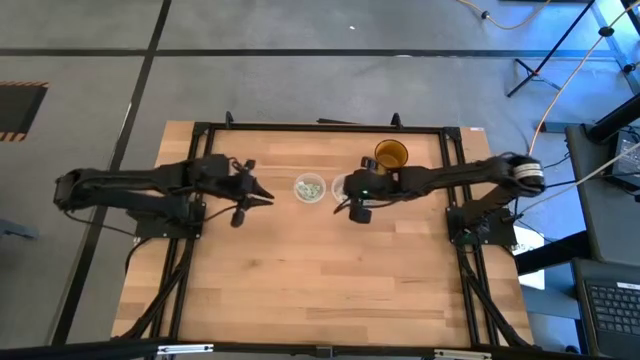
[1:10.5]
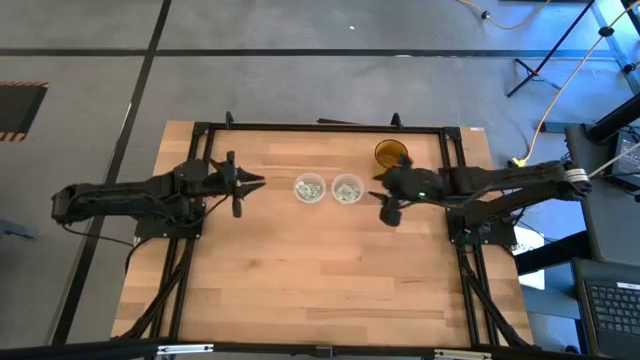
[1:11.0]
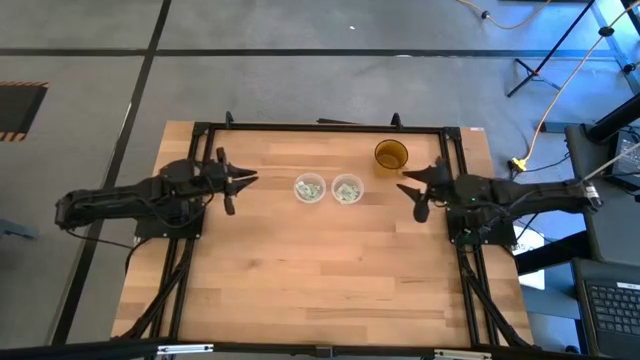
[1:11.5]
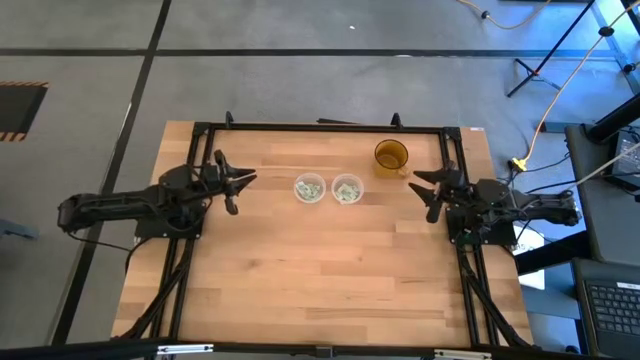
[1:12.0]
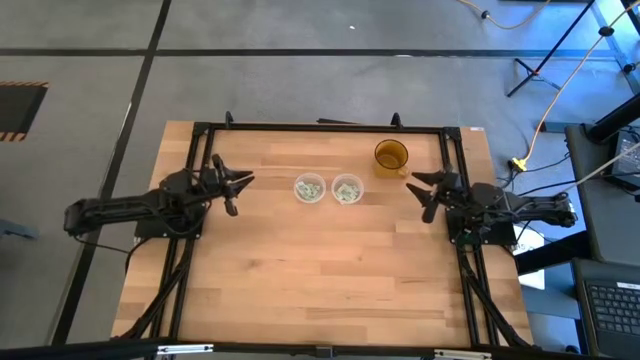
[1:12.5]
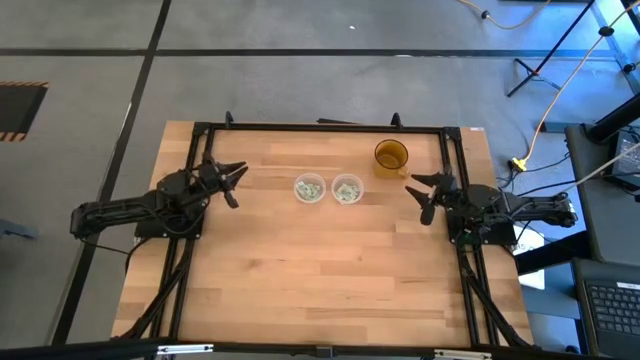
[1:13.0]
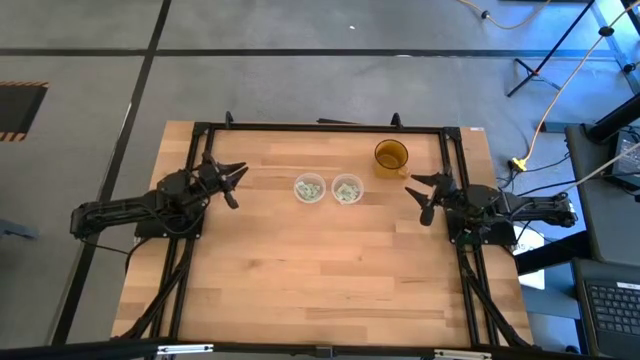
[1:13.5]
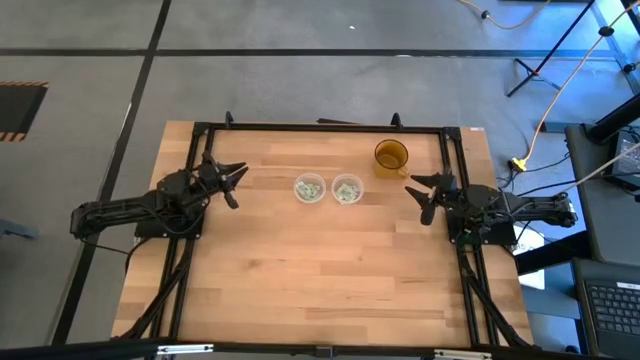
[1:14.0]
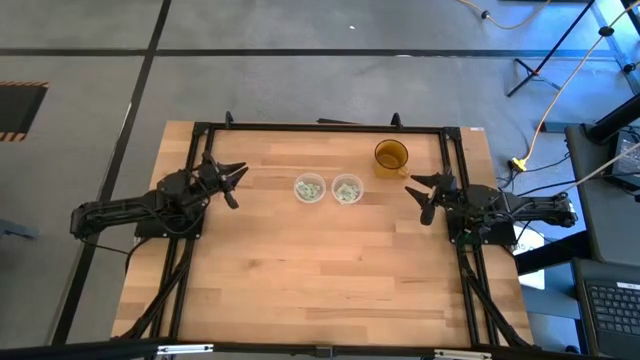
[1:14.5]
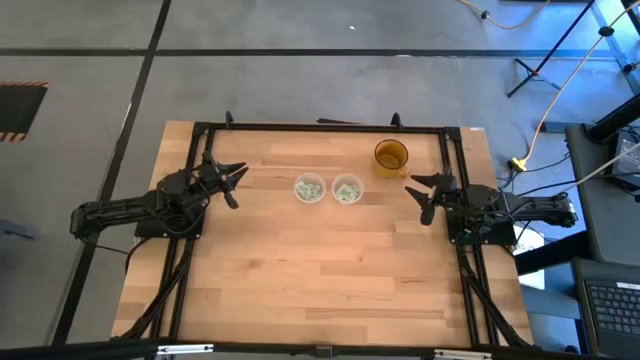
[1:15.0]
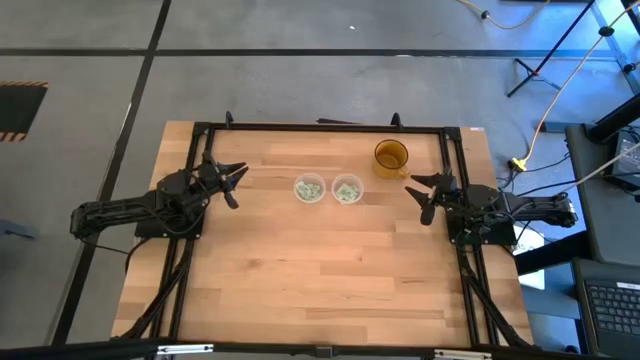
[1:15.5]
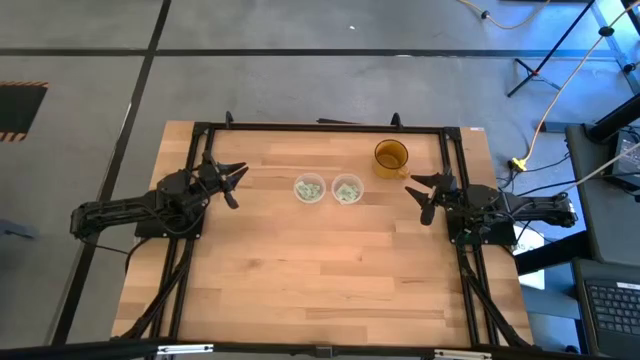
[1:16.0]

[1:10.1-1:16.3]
Task: Pick and place Stevia / Truvia into bins
Return to Home Position

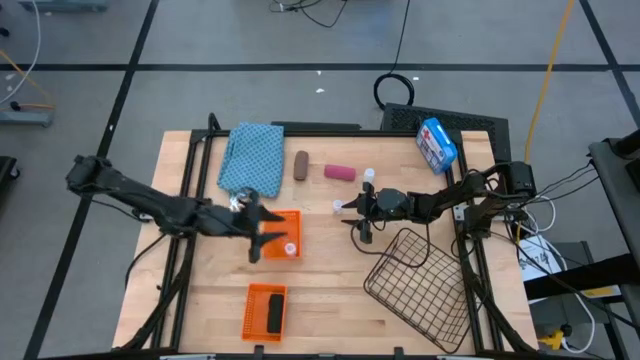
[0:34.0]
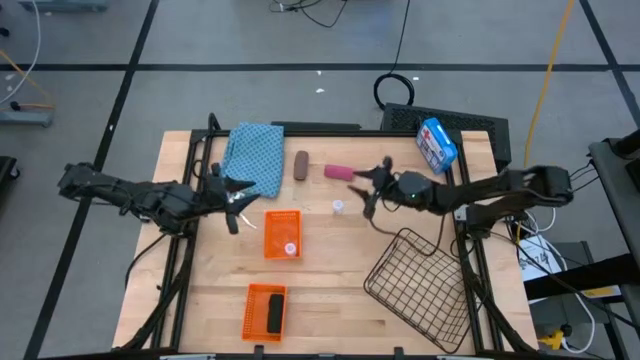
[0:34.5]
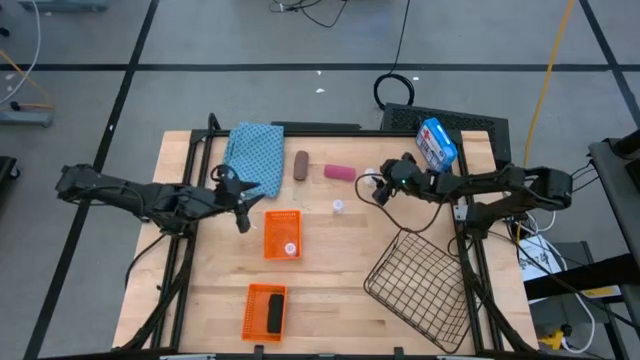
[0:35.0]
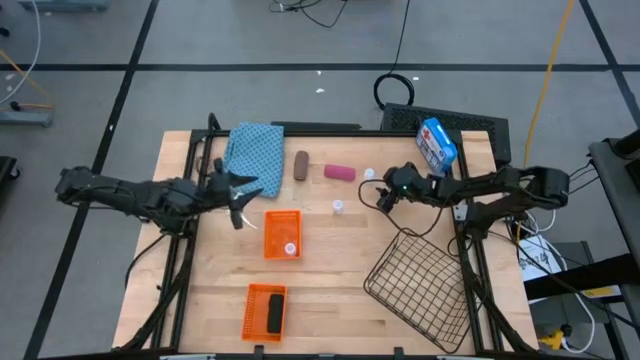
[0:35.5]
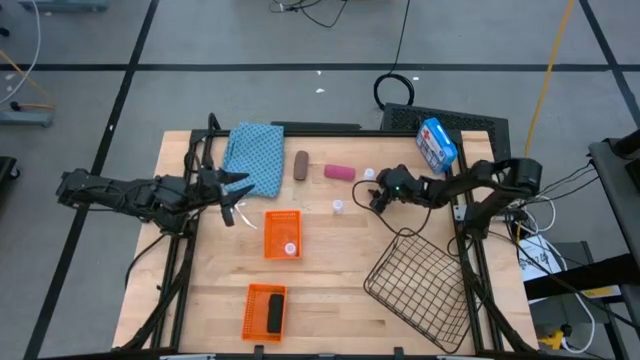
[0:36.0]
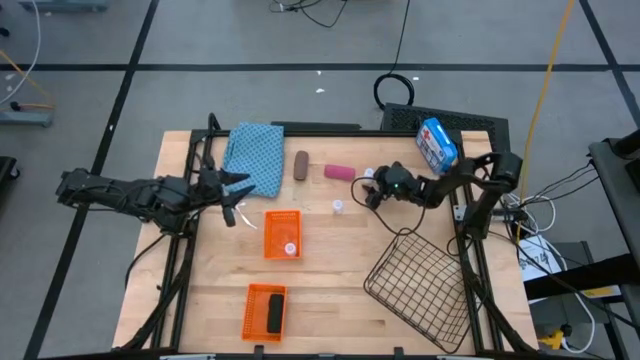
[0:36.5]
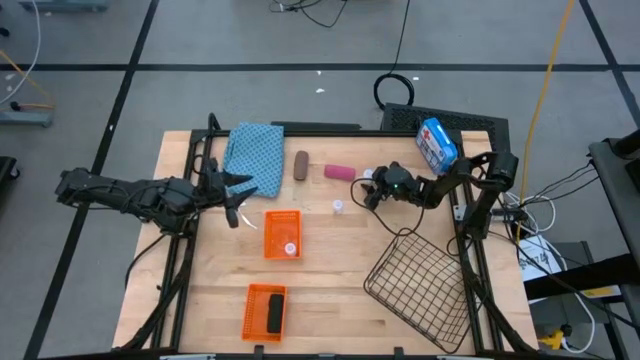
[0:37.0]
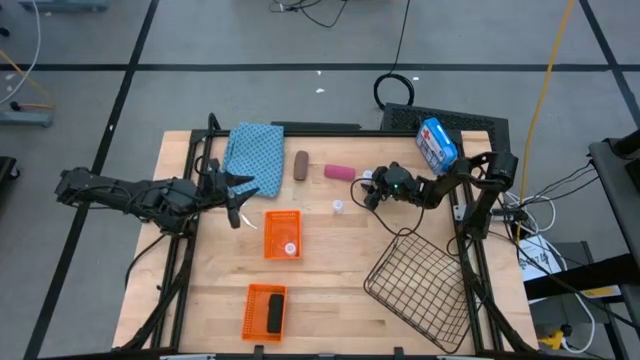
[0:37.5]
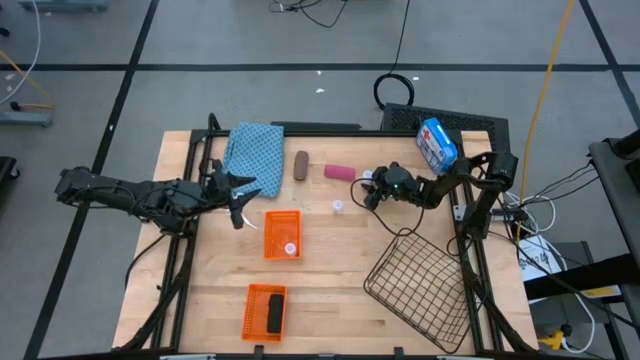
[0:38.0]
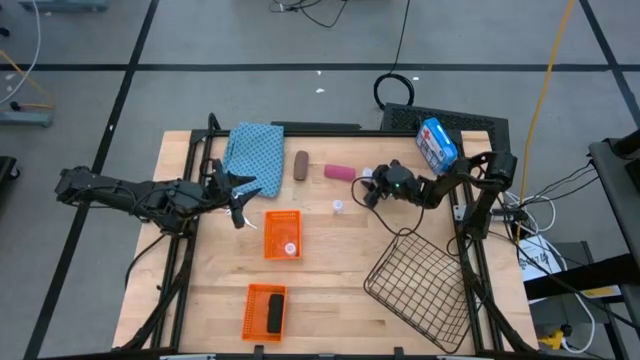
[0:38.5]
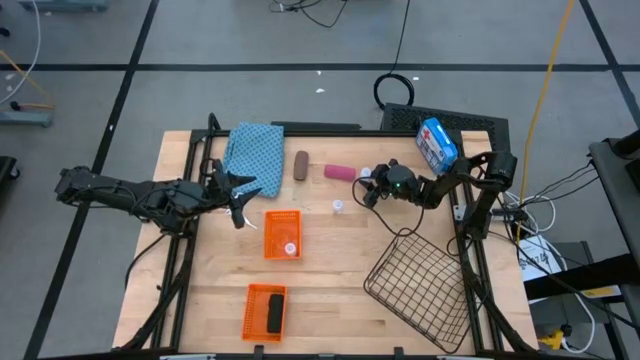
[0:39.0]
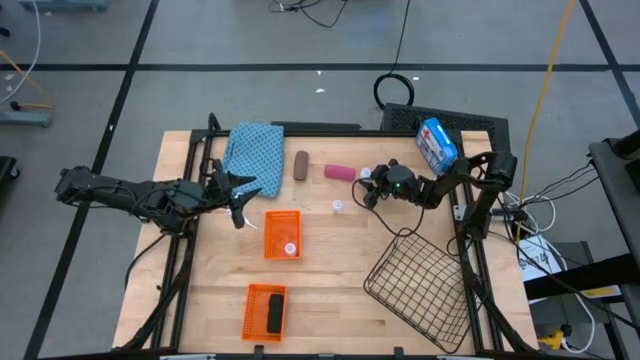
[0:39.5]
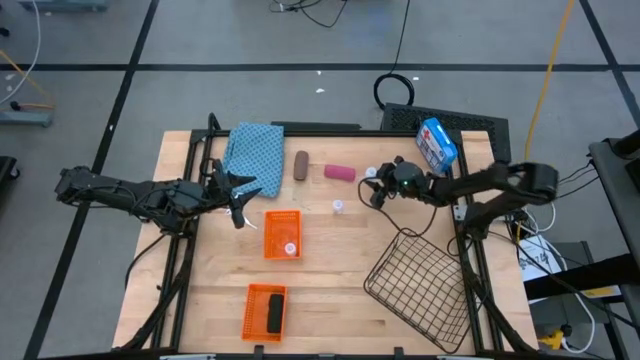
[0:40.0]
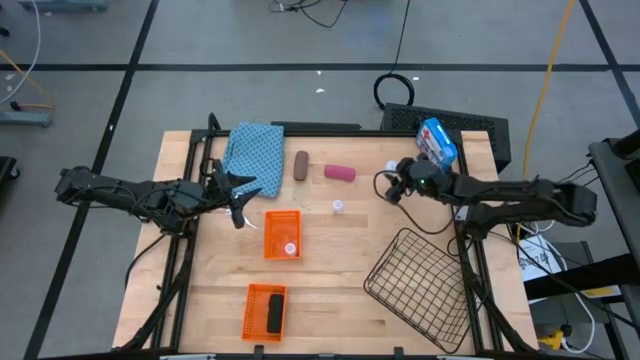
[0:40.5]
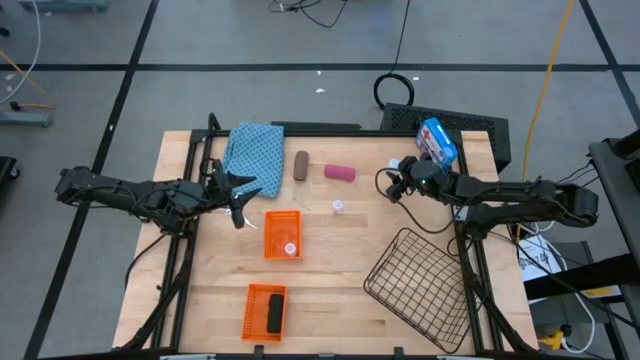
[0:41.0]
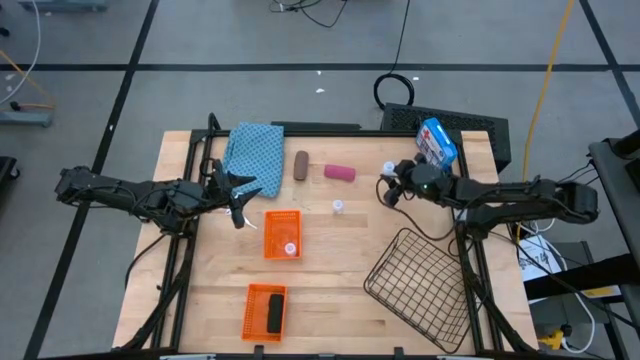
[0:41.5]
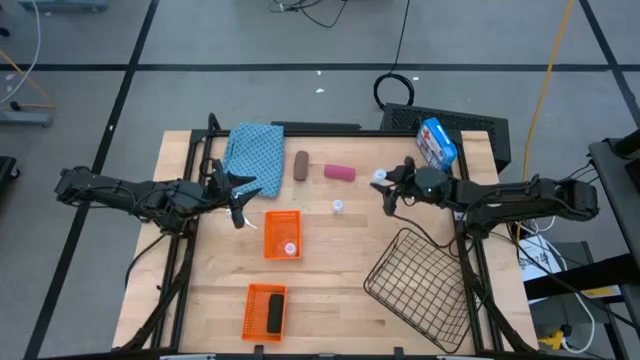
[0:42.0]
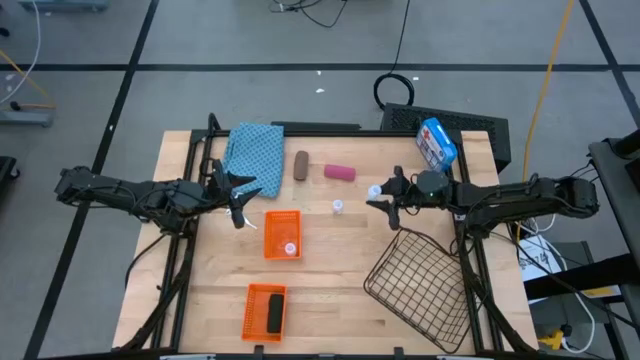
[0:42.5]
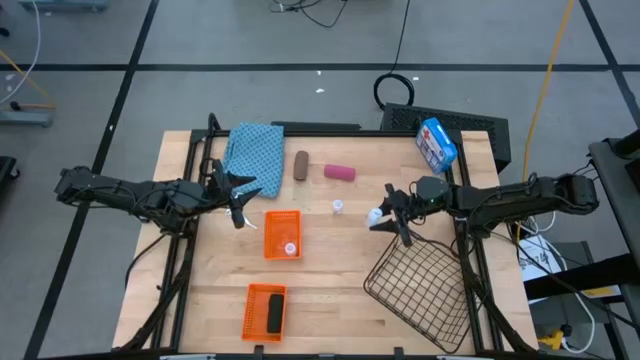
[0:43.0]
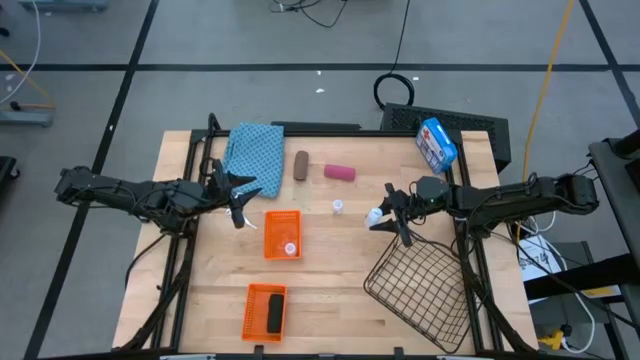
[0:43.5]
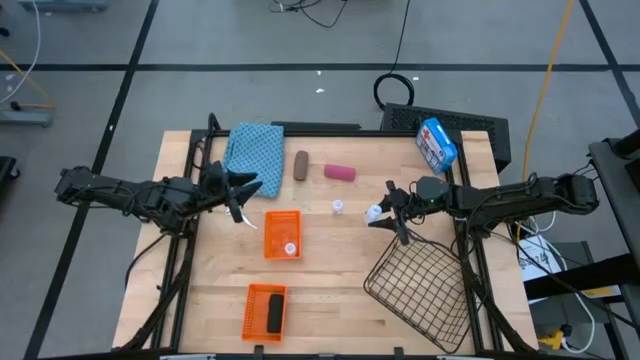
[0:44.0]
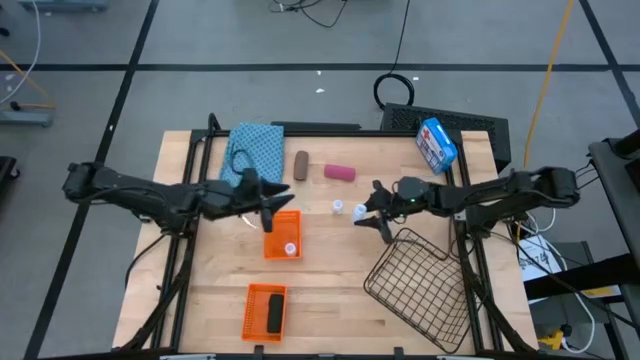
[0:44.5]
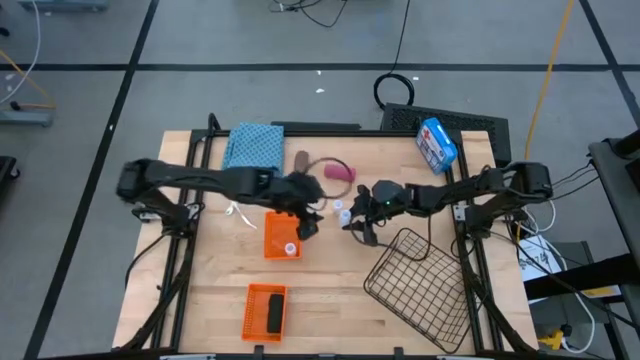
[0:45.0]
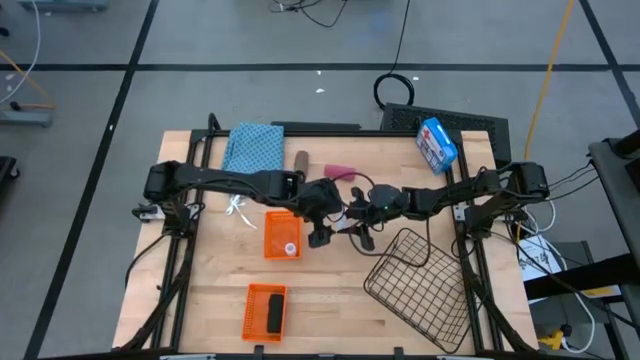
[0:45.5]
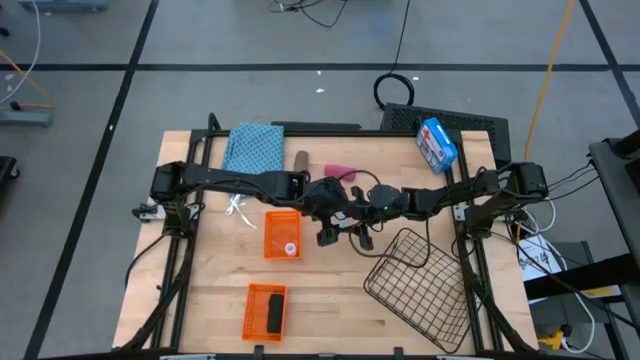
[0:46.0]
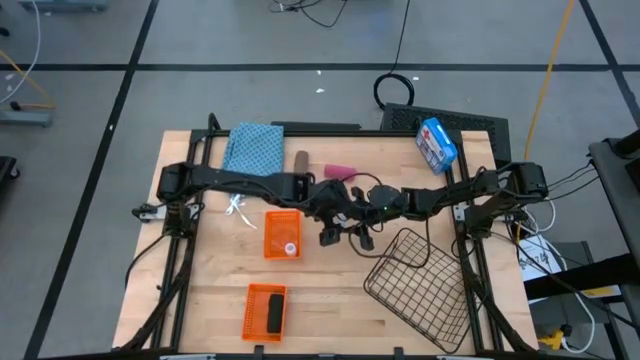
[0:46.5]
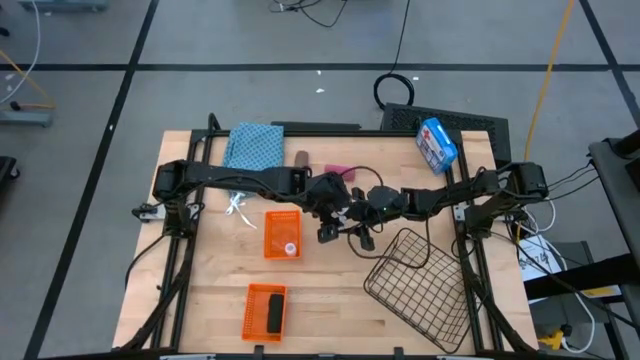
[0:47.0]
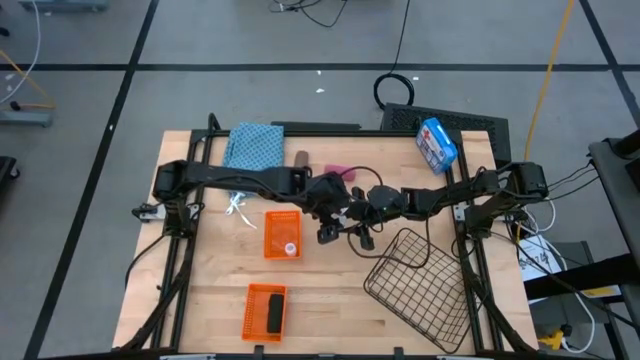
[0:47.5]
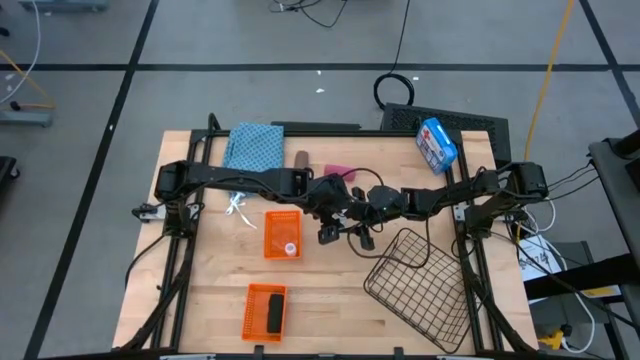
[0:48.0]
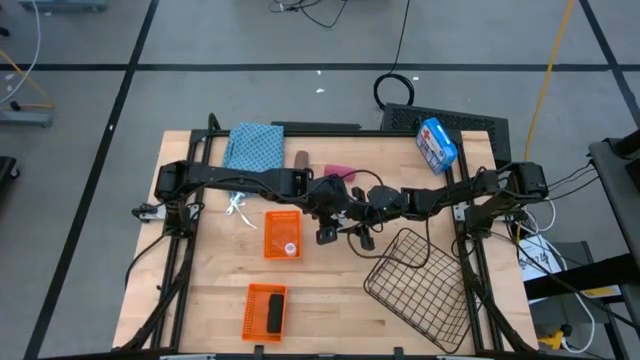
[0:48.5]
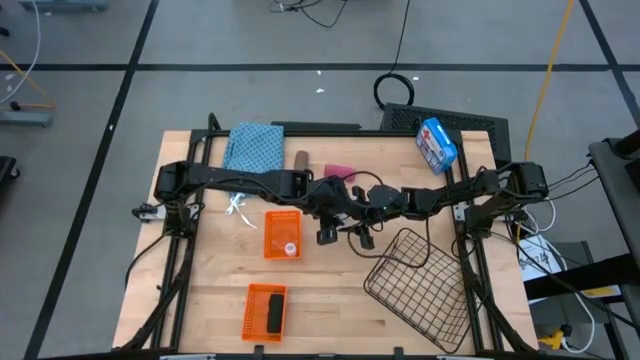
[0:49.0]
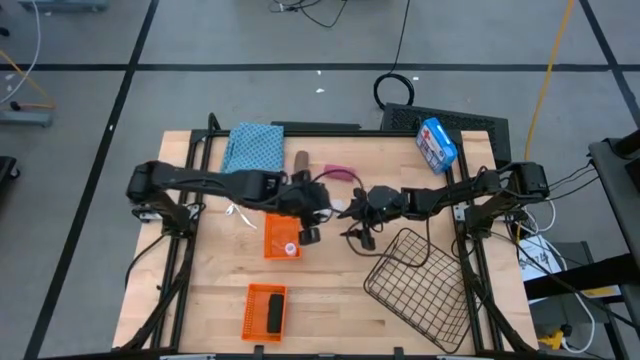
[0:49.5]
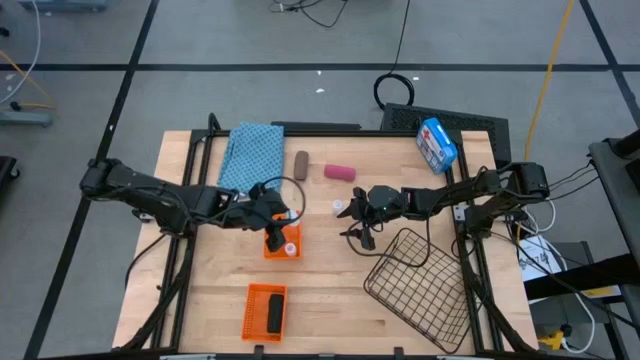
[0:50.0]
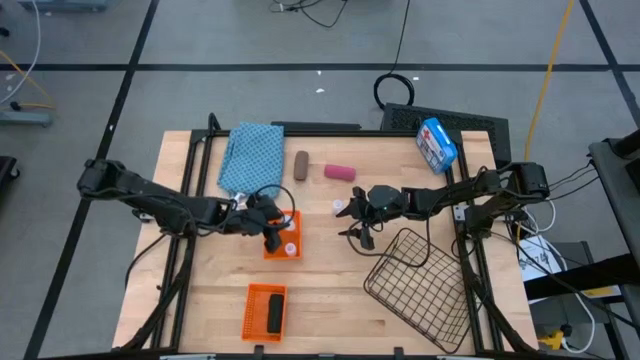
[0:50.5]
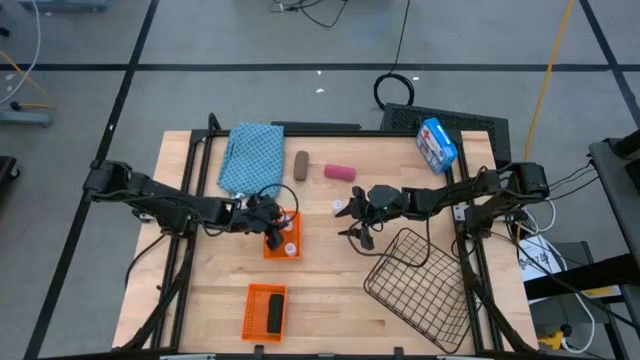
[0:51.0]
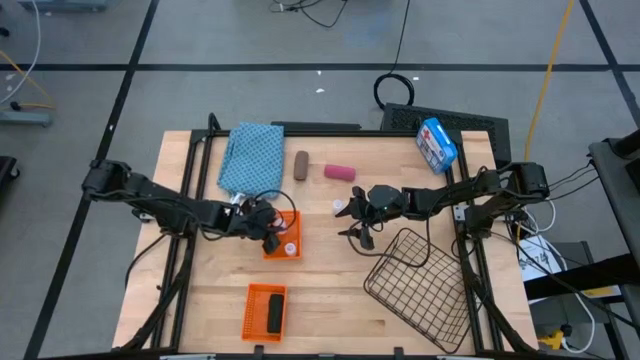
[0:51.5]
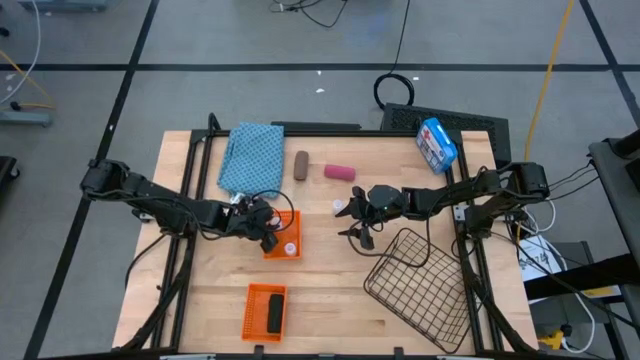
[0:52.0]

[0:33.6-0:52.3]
Task: Pick & Place Medicine items
Put the white medicine bottle into the top orange basket
